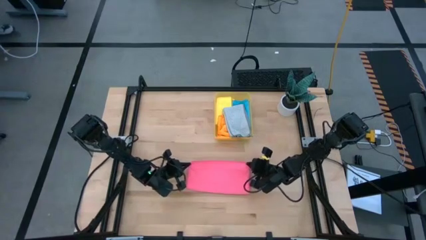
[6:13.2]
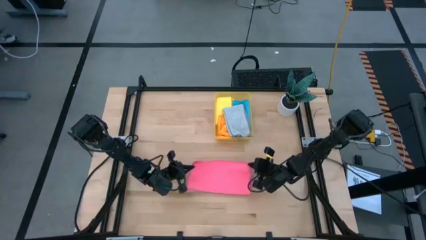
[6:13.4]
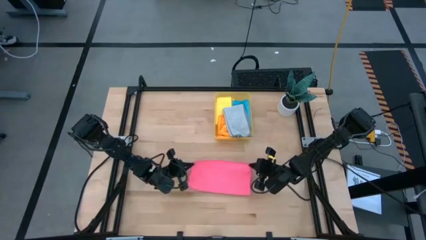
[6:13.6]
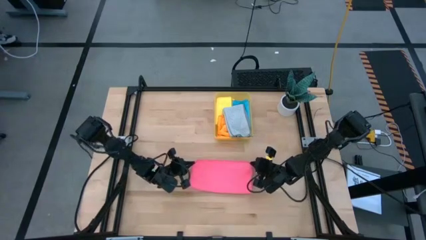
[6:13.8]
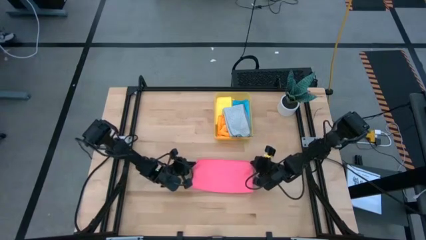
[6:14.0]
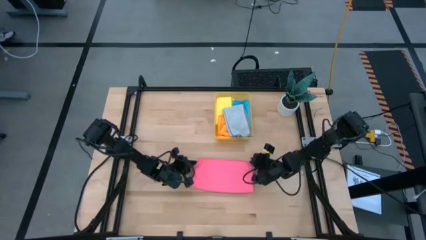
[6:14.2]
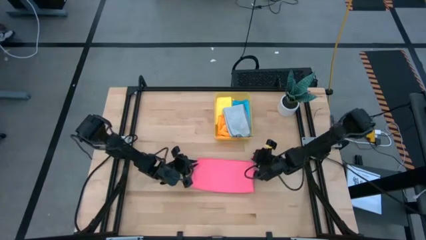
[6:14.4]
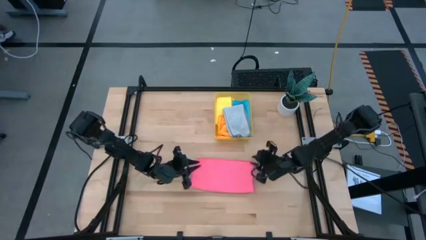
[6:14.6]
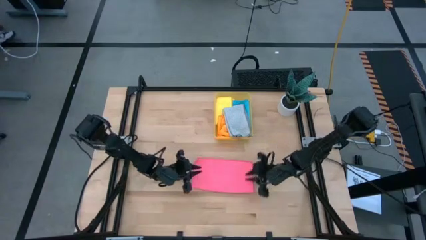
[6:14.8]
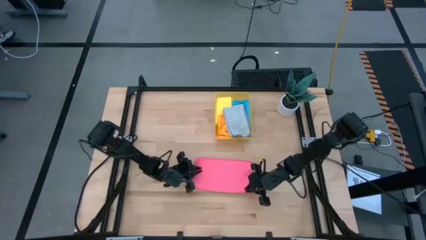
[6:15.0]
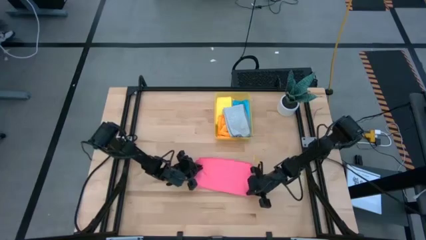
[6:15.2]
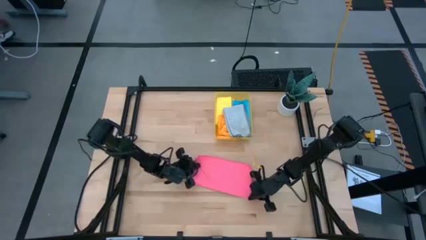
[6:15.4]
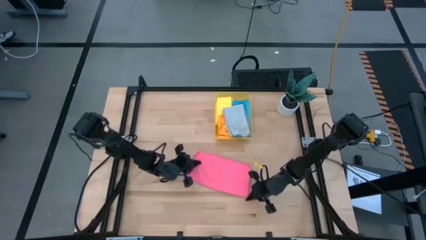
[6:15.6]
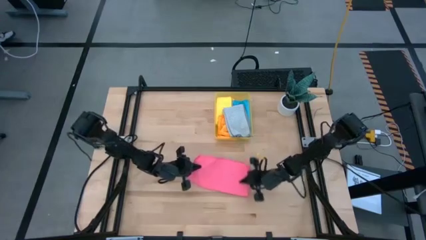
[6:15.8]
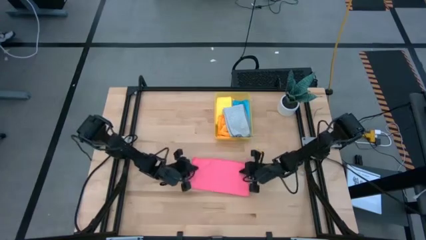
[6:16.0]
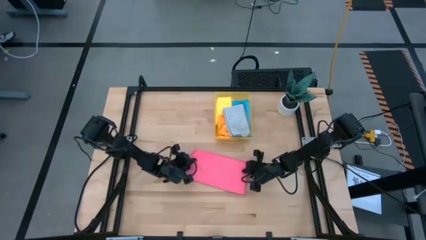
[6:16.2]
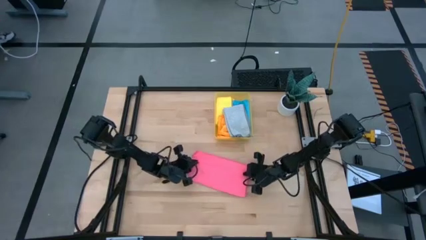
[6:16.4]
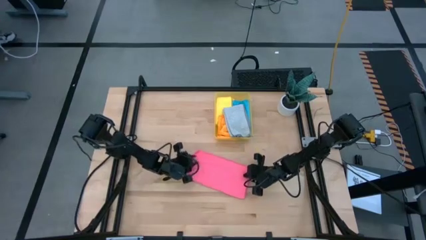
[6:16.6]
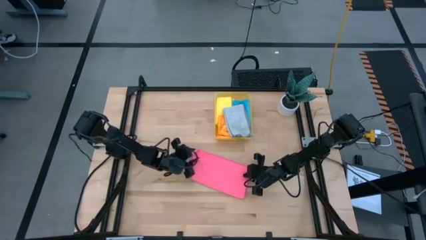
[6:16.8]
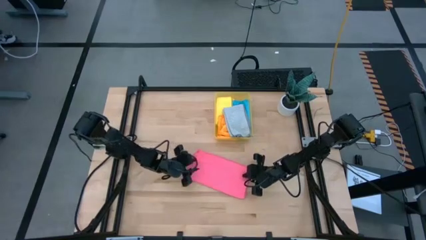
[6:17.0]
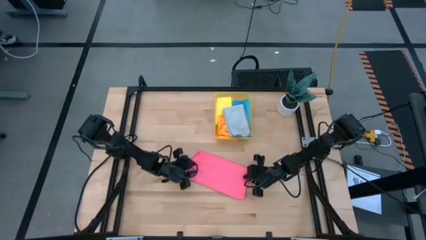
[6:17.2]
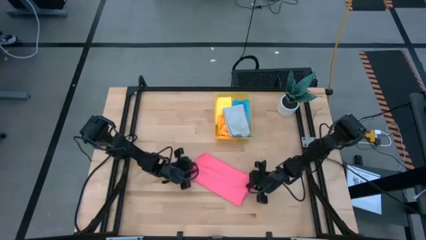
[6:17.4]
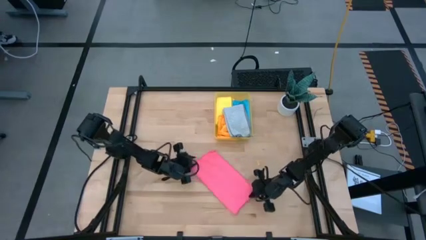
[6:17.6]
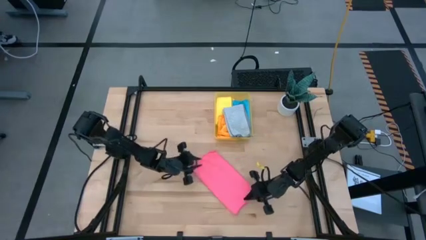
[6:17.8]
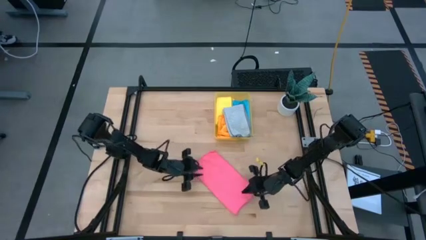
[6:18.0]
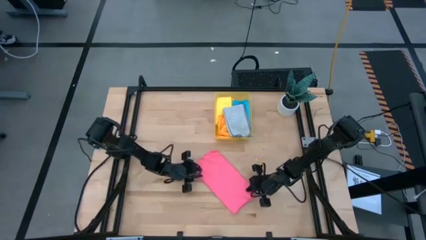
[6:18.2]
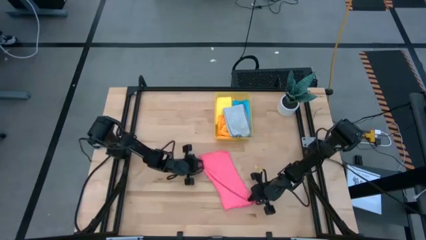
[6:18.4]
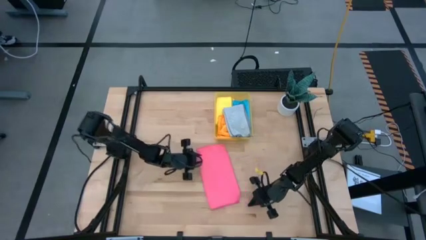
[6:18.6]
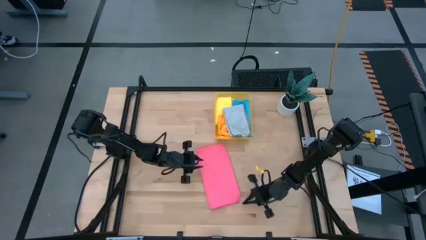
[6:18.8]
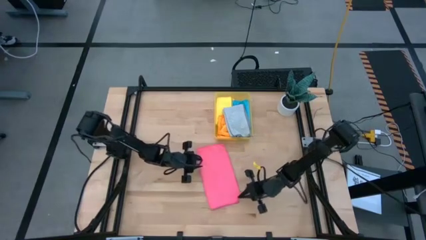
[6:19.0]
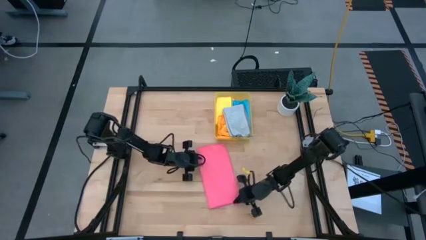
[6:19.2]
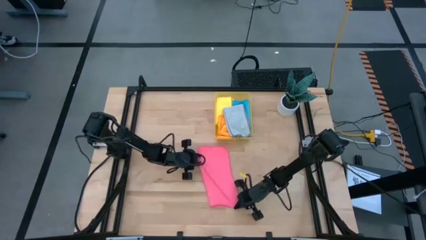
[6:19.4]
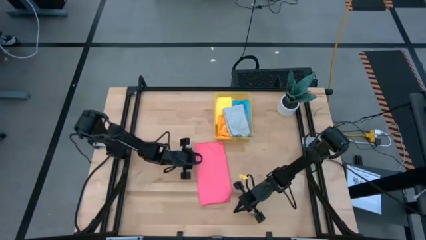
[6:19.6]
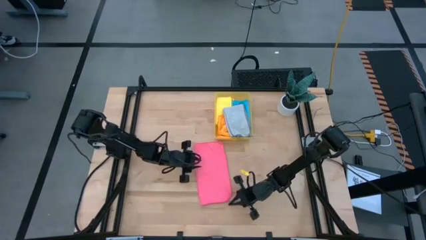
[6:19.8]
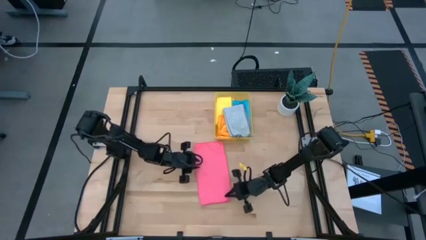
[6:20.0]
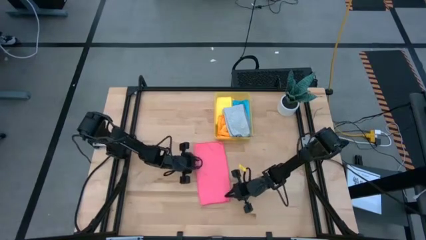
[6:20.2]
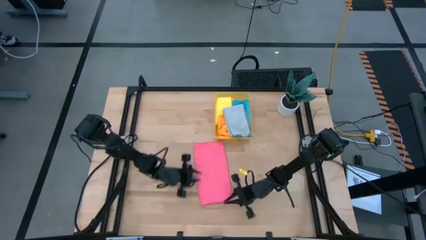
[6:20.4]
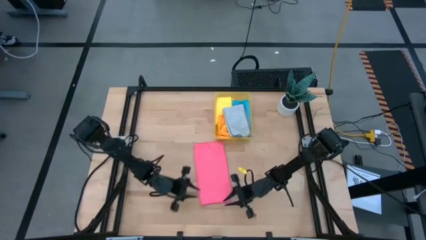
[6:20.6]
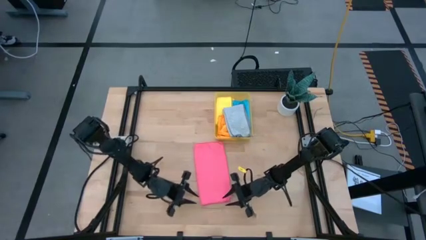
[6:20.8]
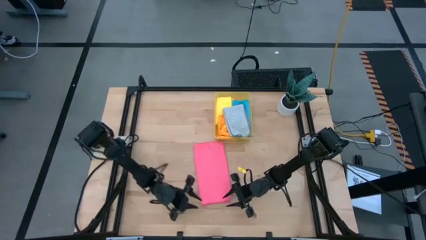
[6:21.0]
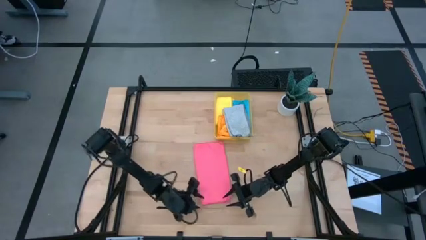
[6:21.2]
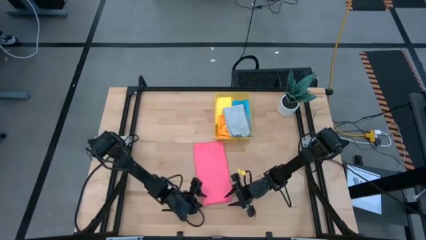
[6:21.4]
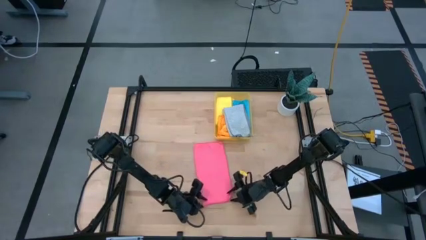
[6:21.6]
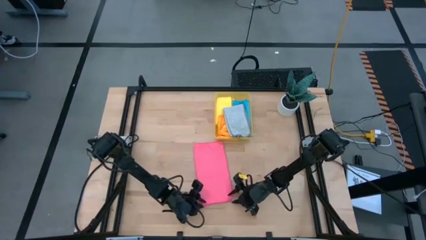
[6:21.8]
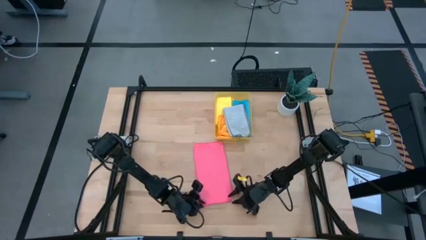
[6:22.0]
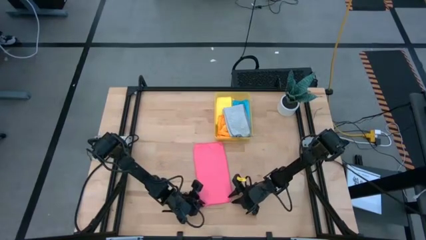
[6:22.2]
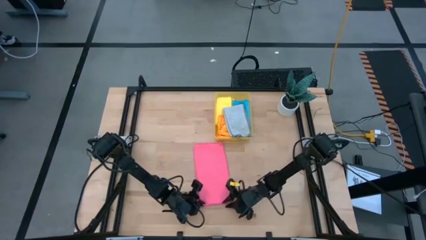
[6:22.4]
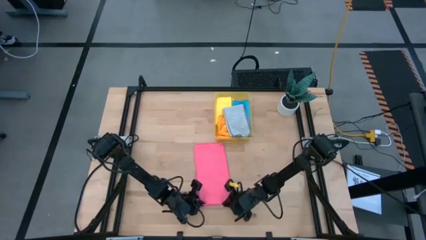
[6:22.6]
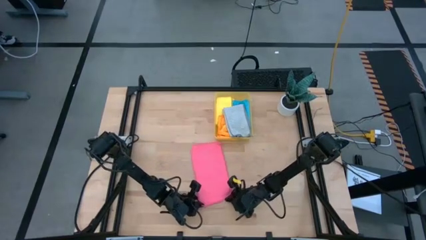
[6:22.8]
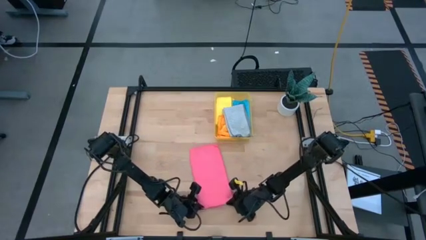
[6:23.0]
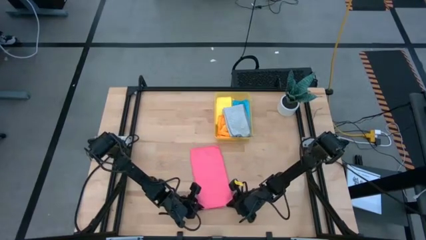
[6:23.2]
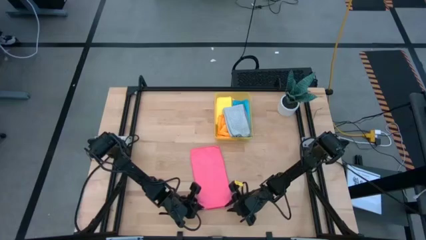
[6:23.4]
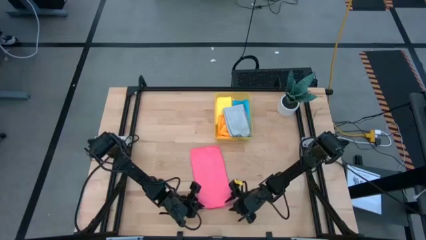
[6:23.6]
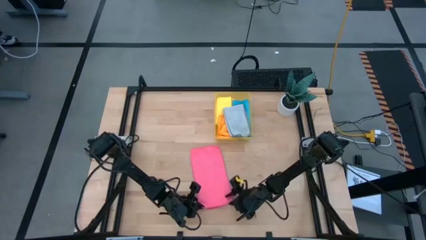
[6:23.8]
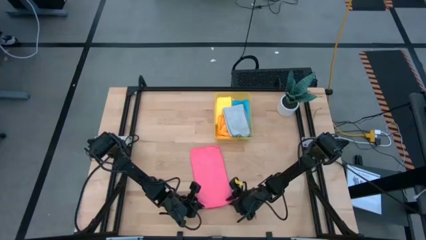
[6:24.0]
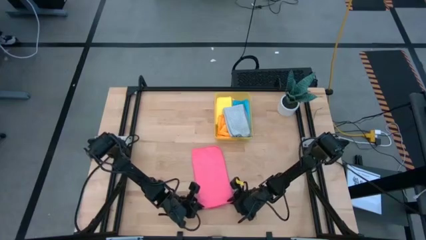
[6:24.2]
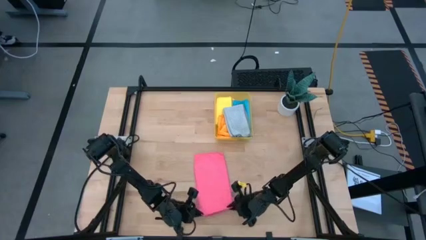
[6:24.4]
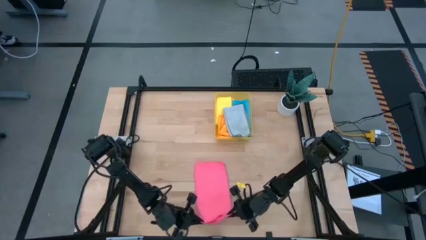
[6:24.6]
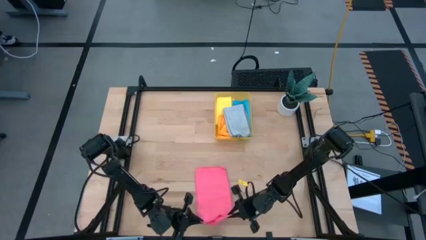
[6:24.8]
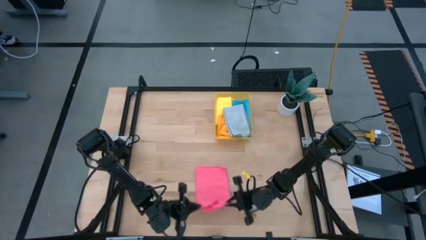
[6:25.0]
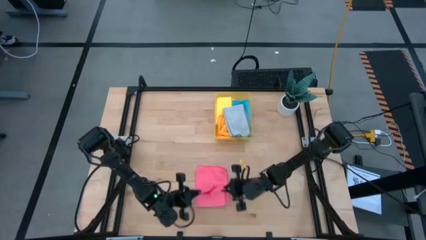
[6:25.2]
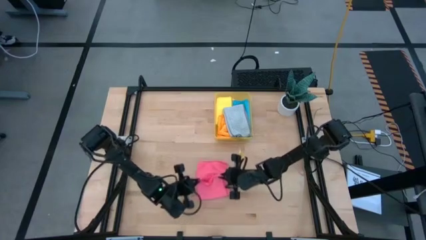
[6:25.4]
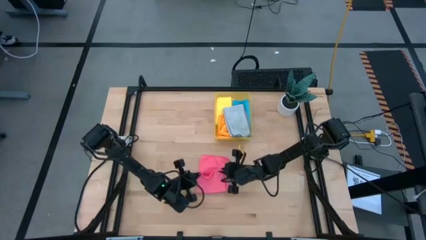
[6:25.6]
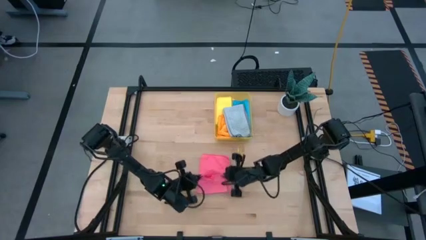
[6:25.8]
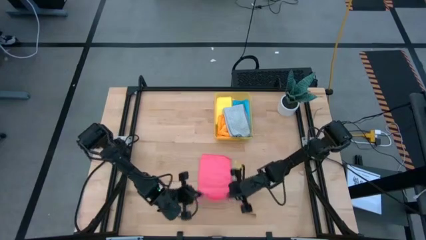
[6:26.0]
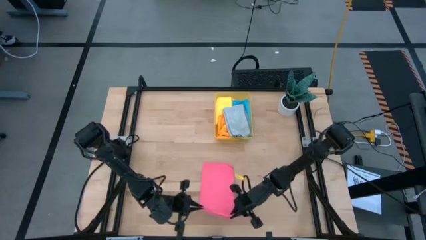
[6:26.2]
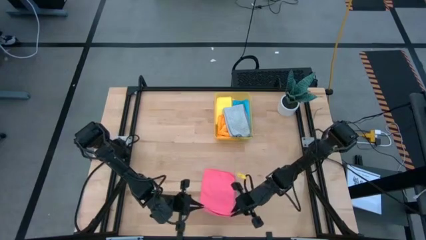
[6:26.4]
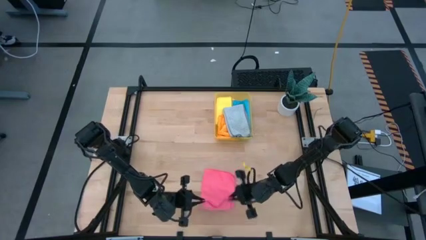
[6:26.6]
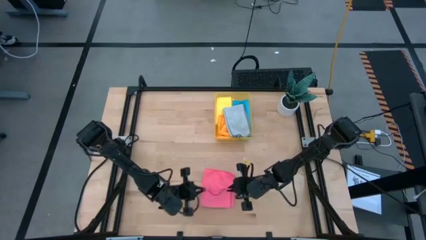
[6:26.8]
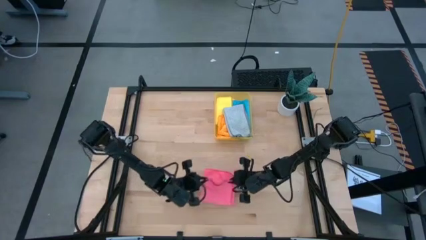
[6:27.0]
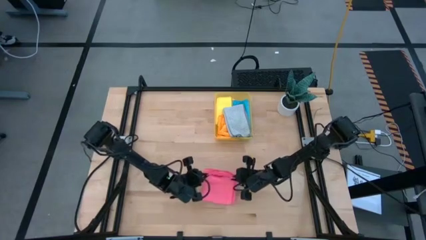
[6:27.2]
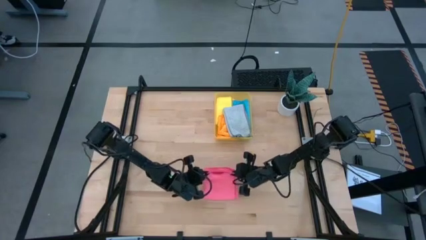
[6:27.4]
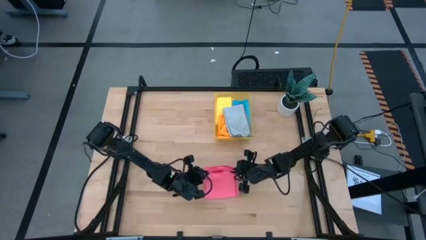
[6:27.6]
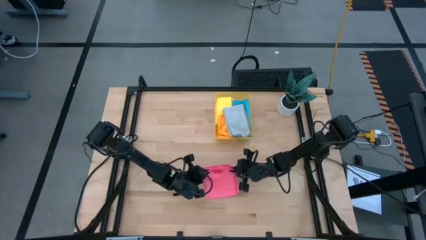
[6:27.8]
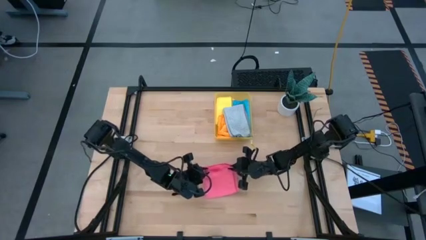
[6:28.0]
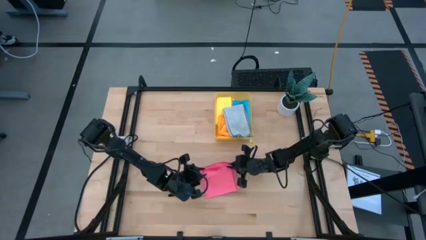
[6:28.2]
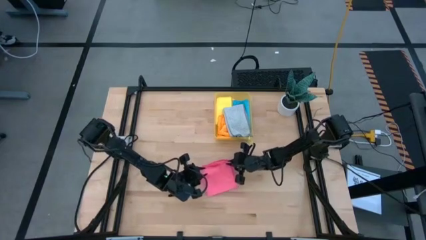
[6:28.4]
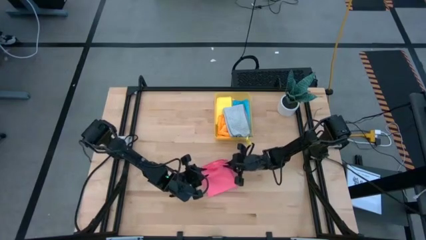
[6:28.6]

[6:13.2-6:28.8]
Task: Fold microfiber towels
Fold the pink microfiber towel

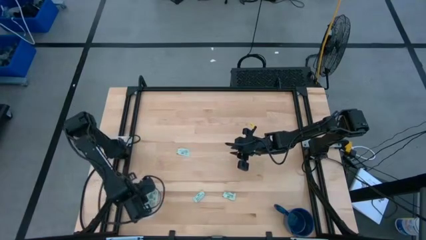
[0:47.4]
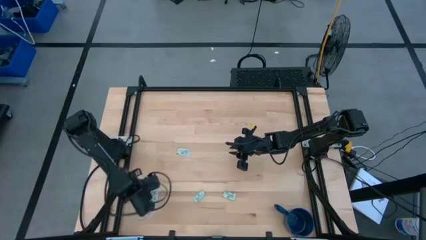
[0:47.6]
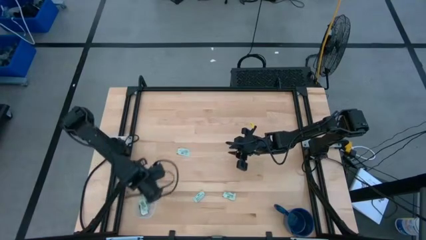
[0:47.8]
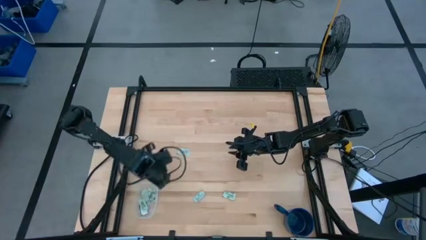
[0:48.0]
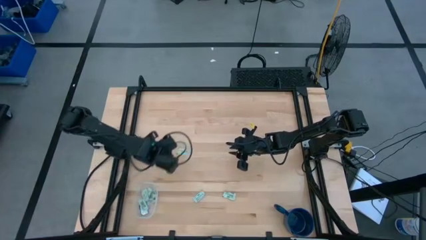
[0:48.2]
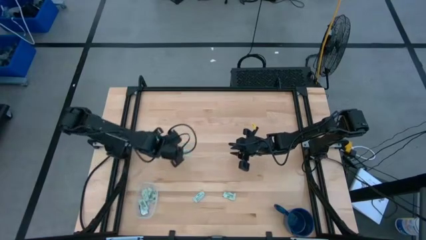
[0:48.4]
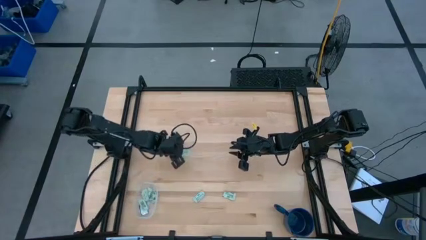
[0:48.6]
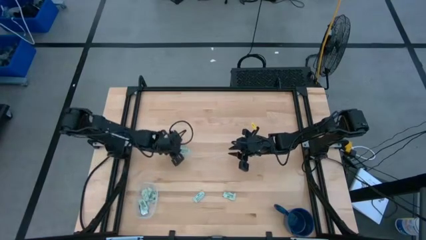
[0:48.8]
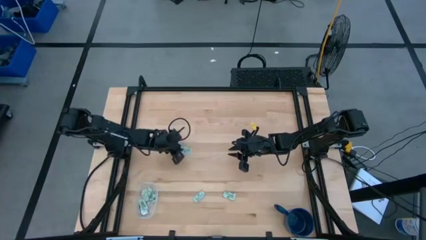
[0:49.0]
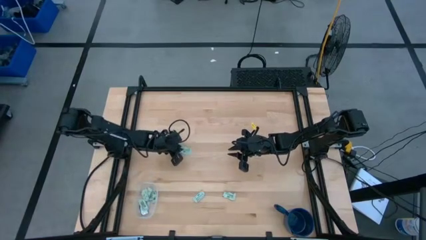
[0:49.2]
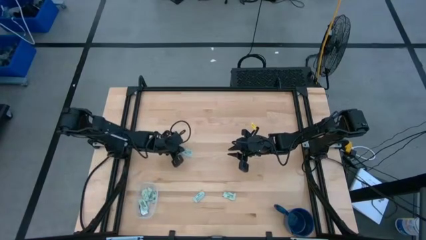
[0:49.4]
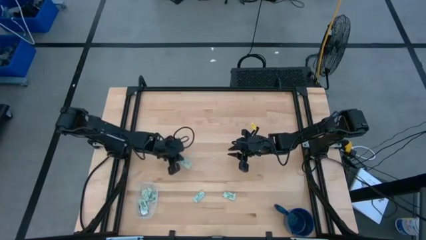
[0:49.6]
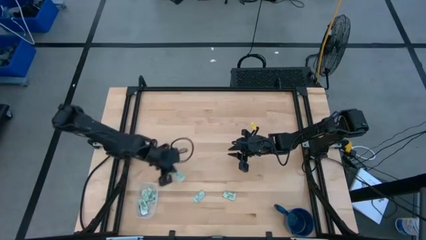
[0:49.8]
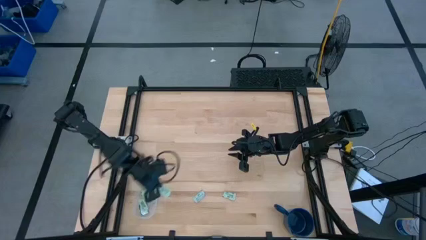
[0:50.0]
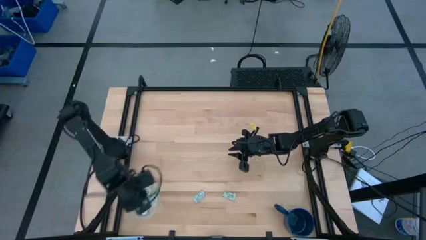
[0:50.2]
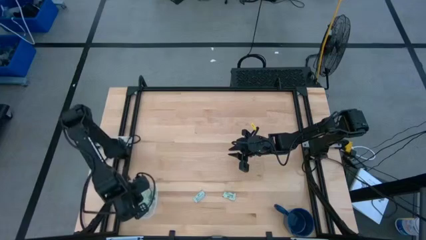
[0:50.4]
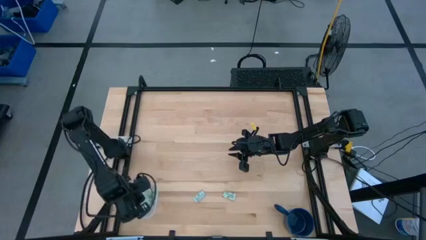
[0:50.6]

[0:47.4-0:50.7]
Task: Pick and place Stevia / Truvia into bins
Put the stevia packet into the transparent bin
